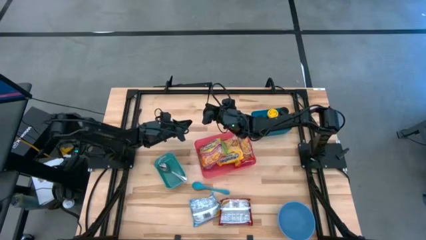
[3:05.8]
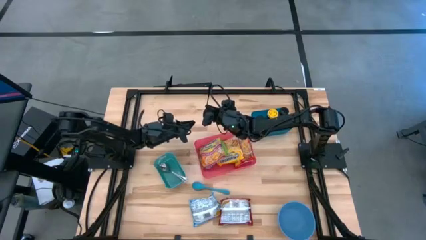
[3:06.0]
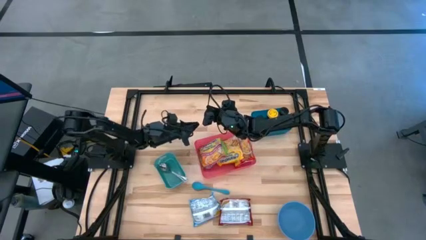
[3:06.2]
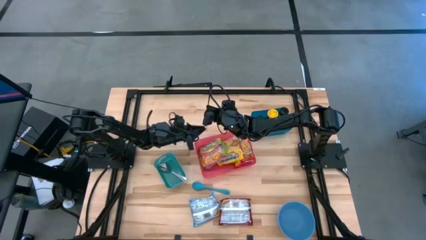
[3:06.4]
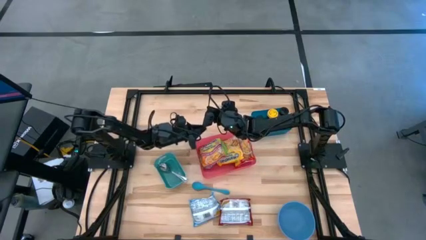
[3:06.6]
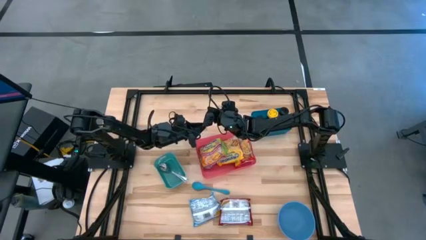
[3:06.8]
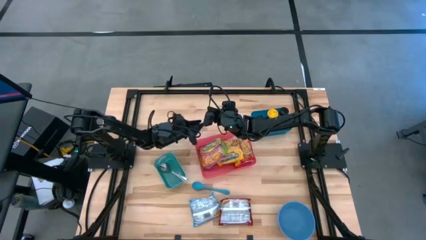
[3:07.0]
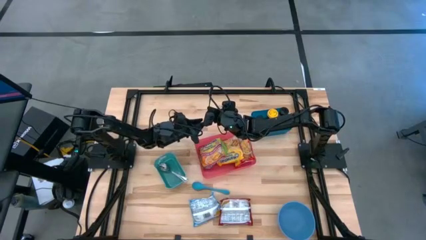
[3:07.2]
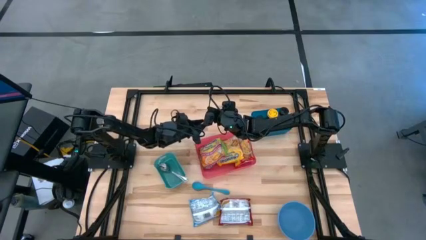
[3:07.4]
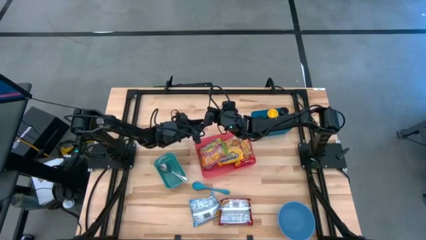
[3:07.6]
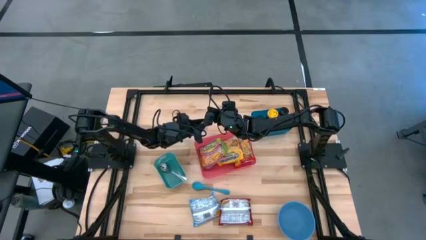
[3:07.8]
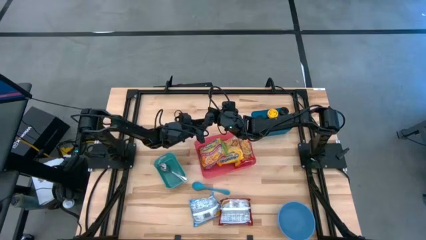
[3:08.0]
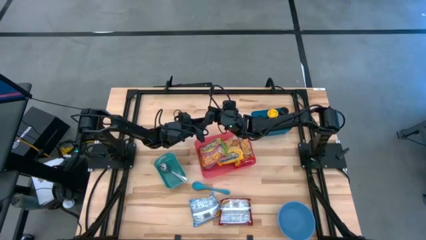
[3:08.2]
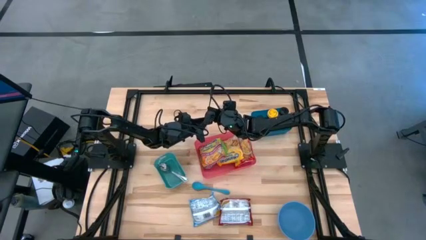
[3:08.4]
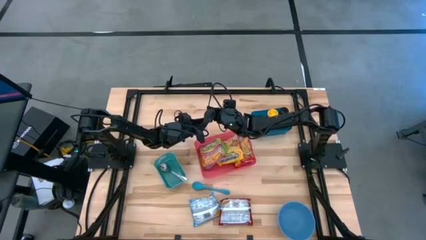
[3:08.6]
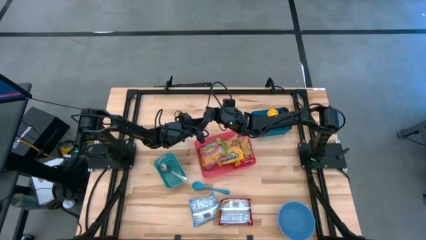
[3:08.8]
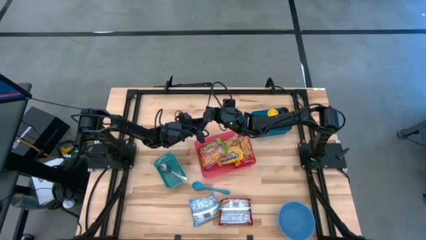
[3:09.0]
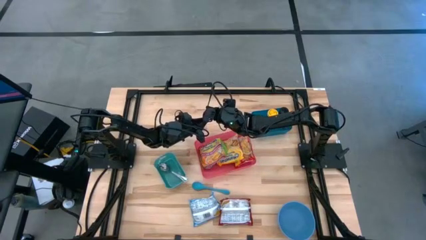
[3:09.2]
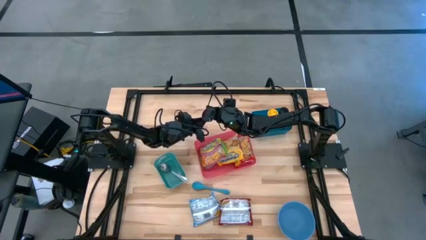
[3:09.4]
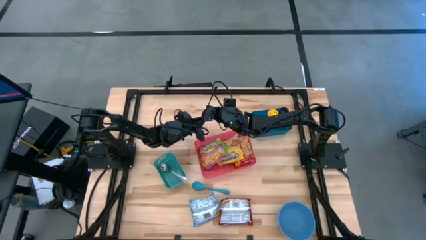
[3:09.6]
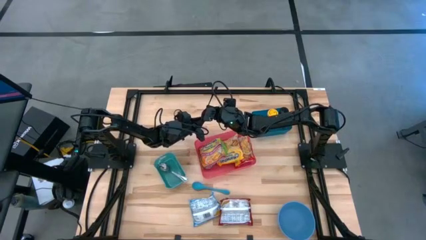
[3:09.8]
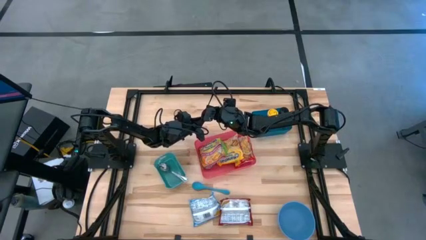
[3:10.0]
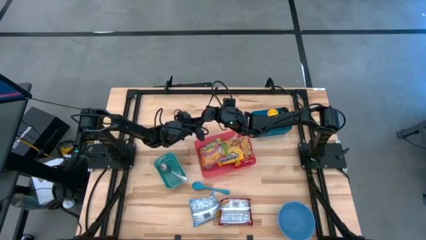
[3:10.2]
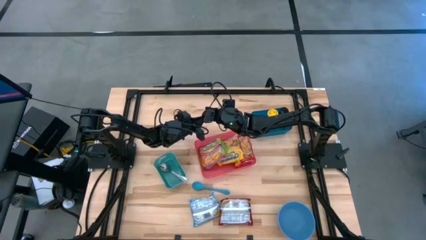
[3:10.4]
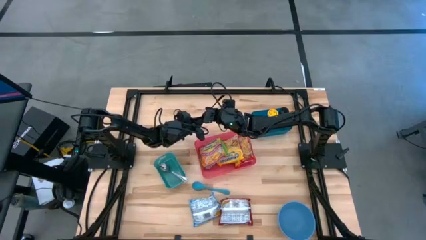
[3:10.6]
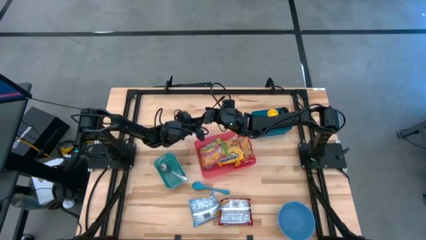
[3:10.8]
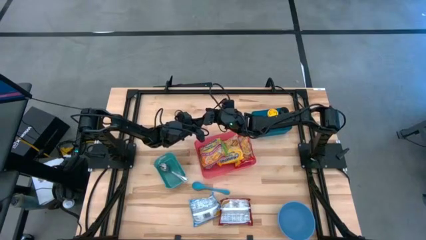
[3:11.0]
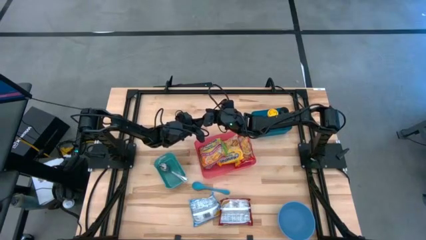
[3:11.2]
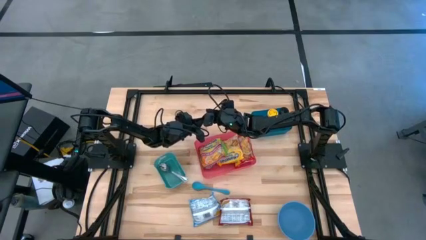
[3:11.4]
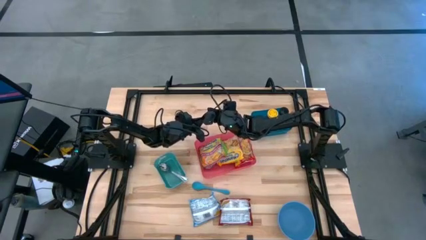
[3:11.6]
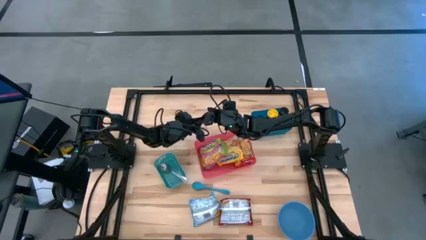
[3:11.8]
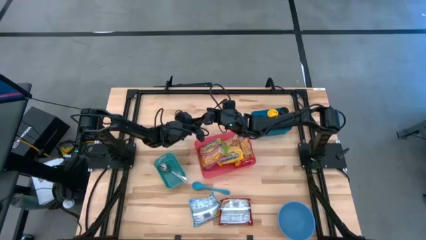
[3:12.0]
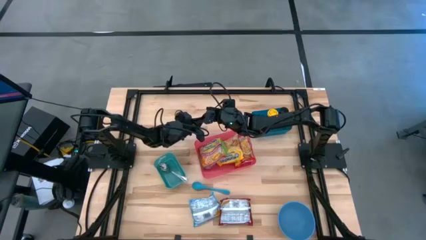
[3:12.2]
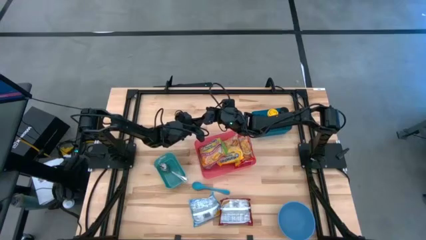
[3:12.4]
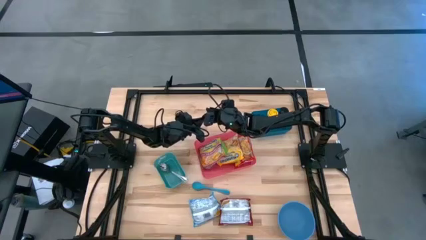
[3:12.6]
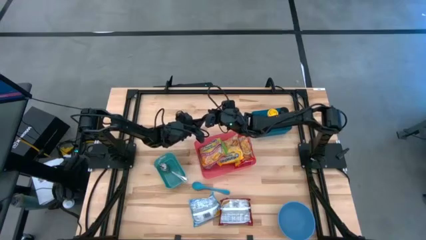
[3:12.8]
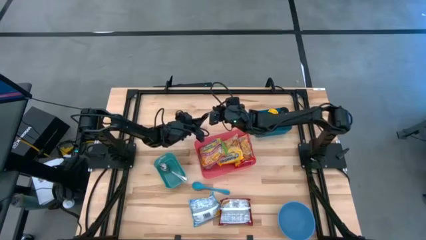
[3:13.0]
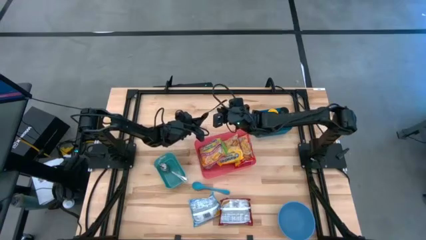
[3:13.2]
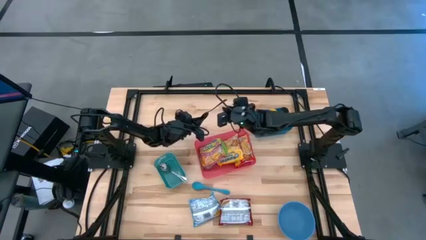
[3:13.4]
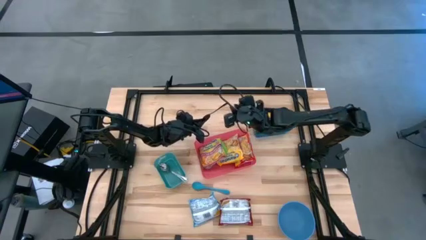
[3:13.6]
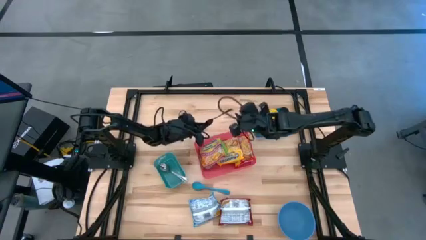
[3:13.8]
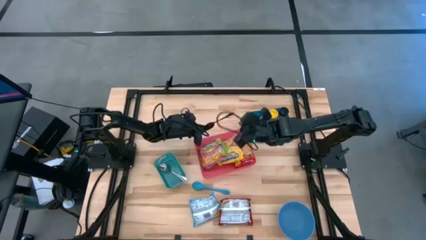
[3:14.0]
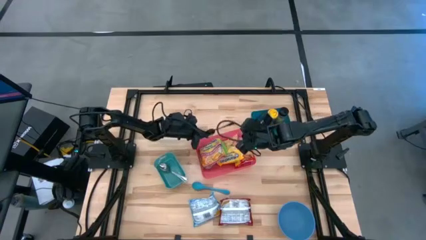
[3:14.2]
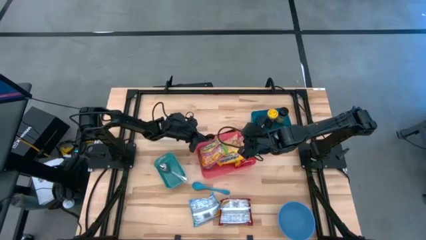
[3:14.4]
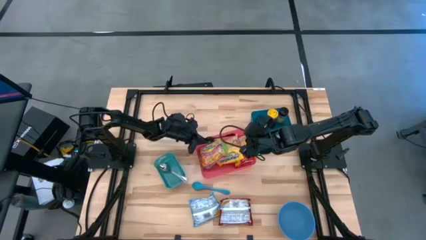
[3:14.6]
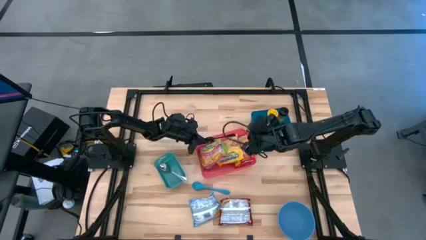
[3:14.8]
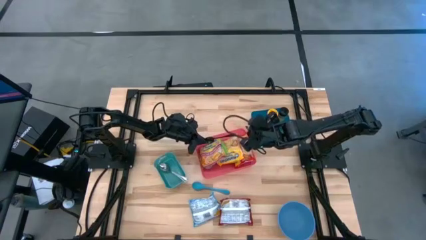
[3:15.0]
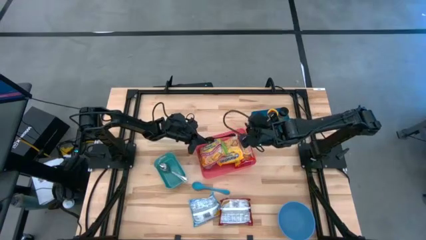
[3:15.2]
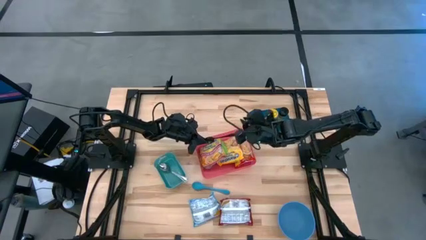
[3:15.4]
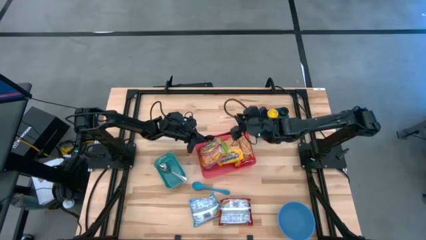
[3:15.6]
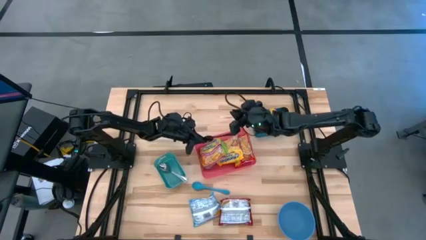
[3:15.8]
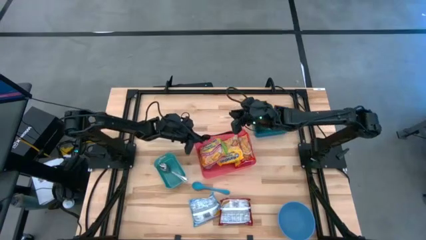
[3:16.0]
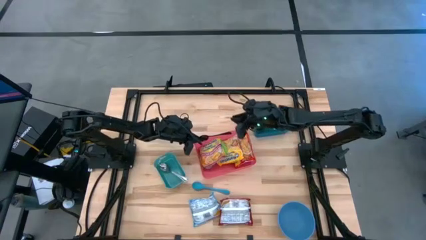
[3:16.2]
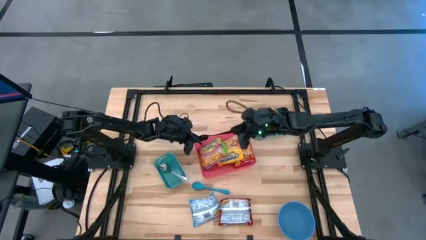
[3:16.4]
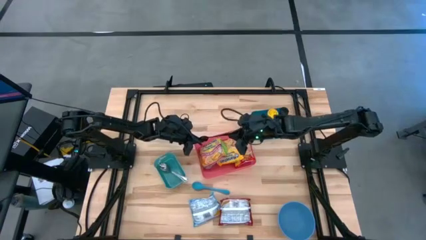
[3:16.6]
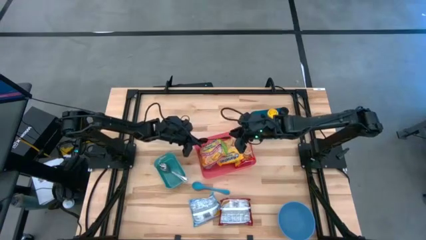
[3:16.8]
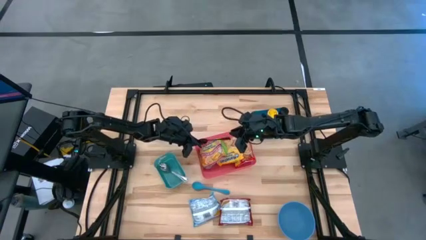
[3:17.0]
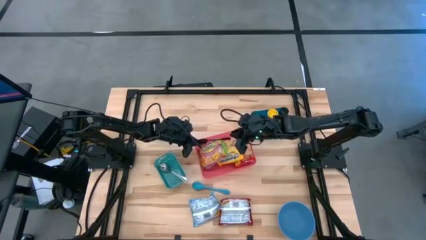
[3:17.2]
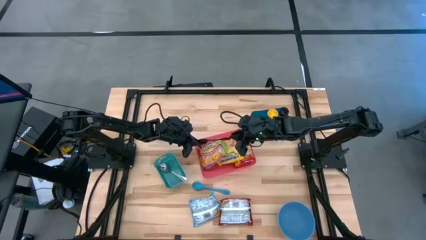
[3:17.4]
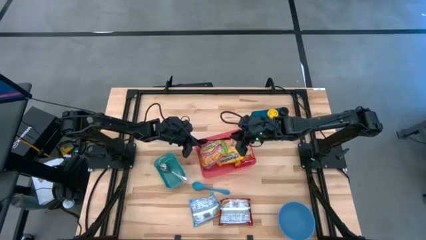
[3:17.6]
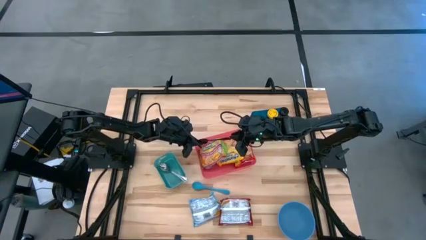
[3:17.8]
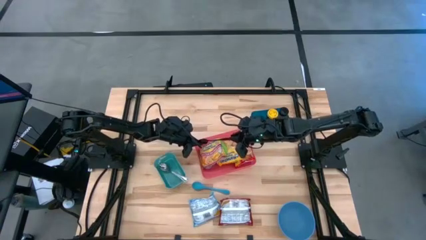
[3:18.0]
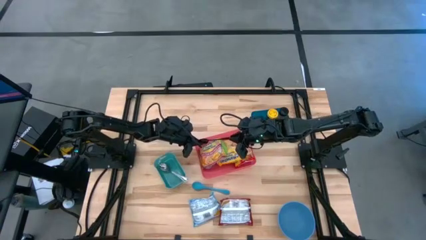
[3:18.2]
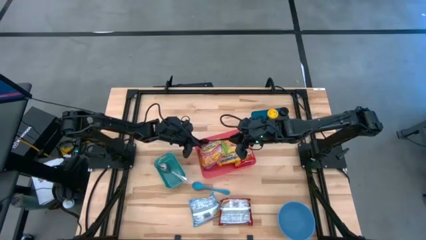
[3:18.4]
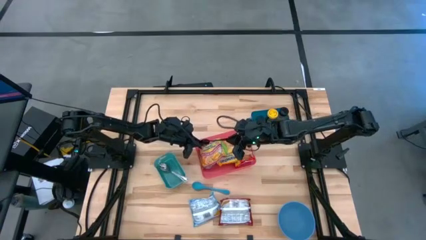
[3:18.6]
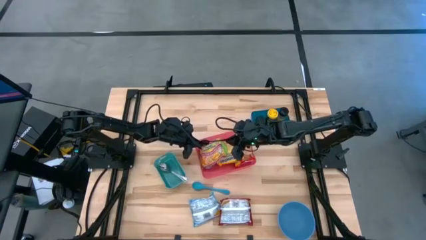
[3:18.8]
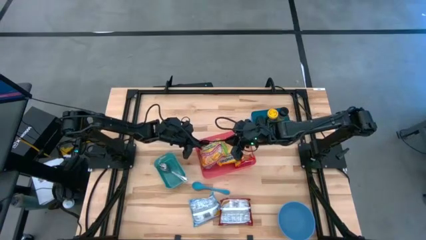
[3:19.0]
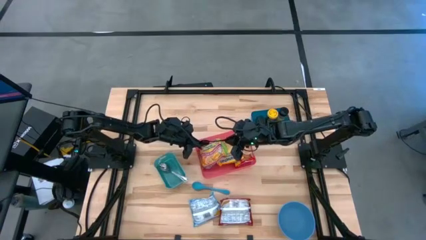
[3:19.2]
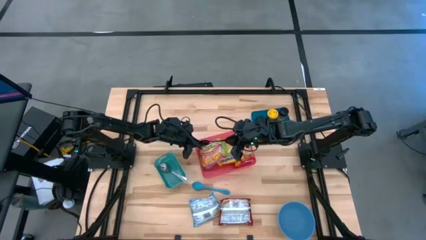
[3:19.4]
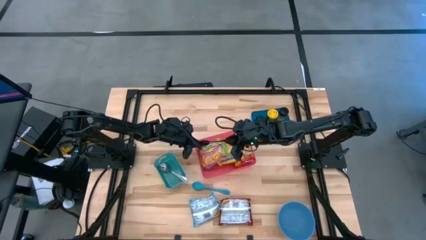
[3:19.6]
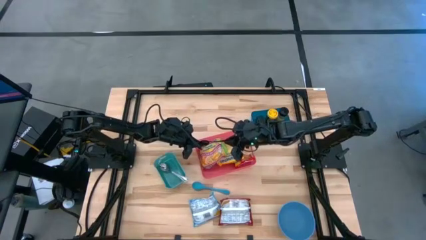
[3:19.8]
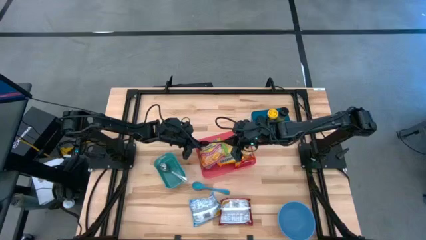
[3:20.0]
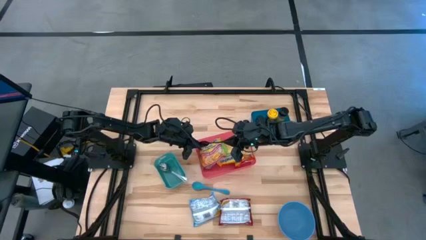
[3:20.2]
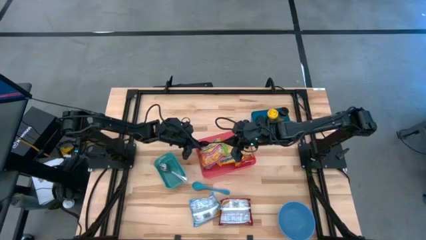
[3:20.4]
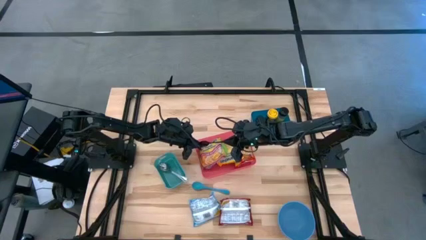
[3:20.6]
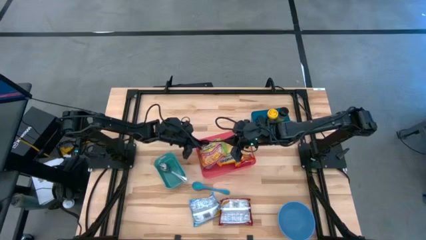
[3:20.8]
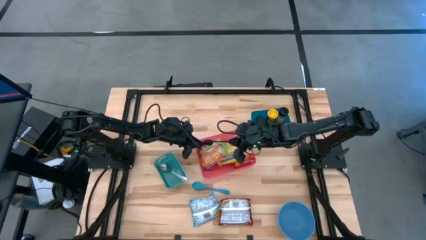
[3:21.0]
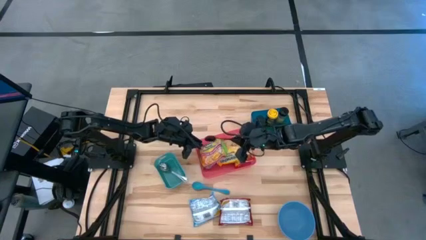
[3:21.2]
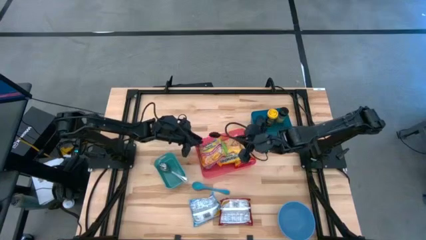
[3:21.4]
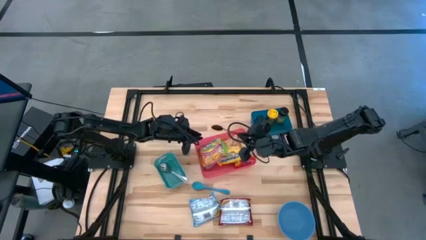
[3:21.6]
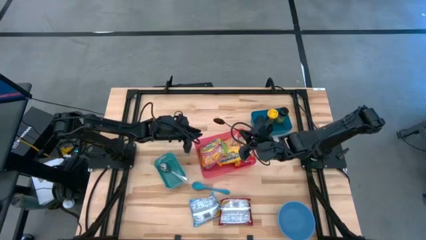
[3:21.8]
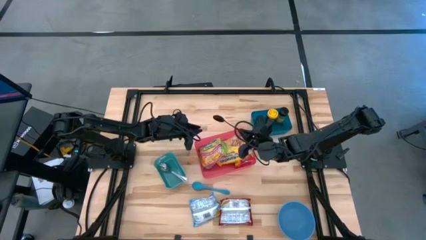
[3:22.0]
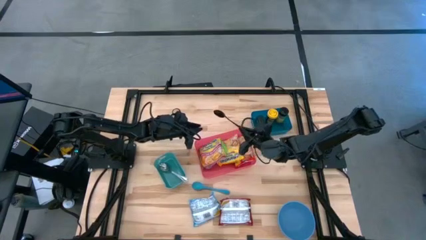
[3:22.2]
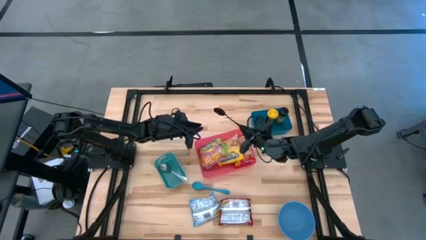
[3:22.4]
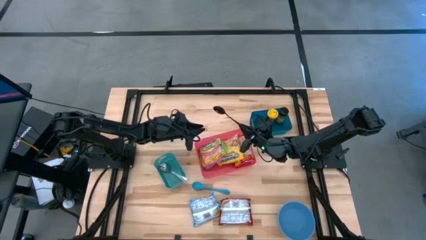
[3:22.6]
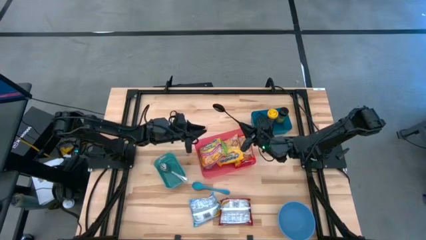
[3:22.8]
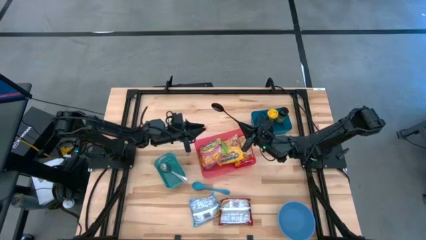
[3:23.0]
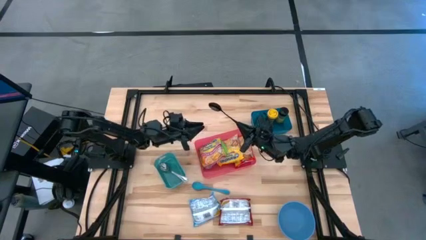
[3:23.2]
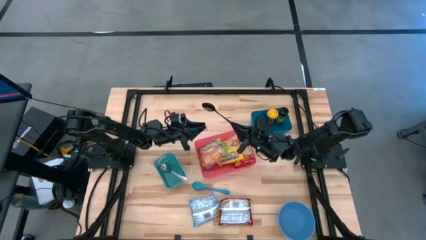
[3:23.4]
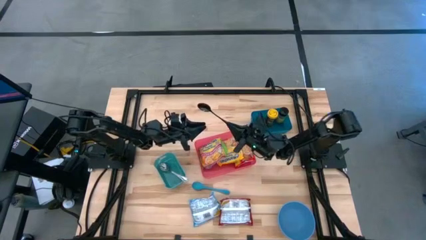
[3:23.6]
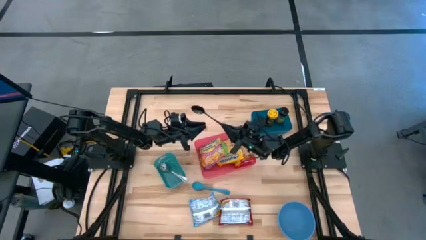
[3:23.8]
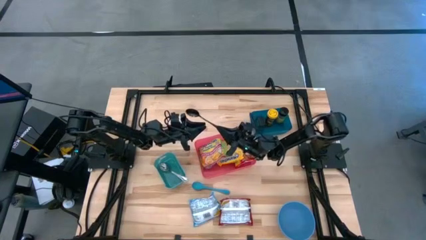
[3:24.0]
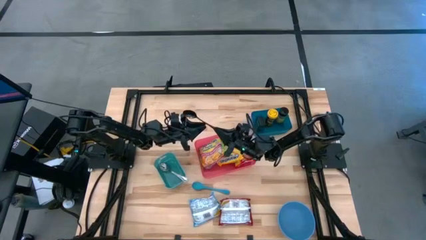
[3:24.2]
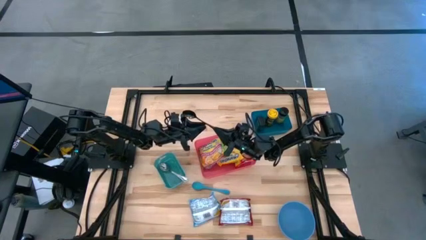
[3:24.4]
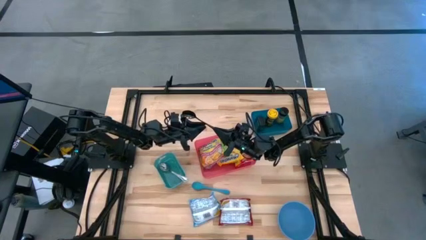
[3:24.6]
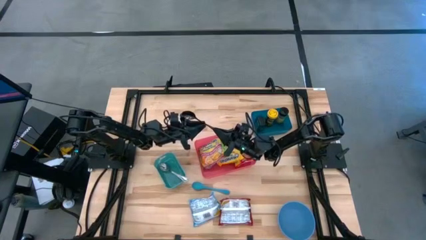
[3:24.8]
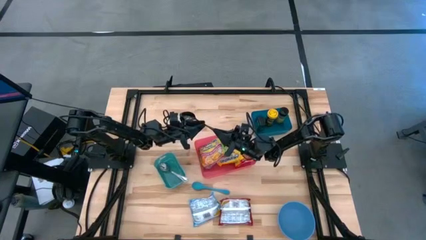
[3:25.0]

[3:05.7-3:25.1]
Task: Pick & Place Food Item
Put the black spoon into the green bin
